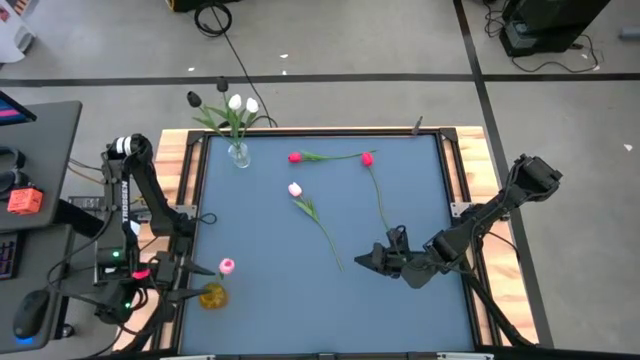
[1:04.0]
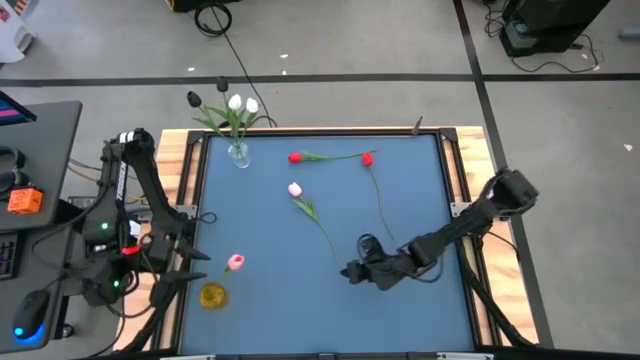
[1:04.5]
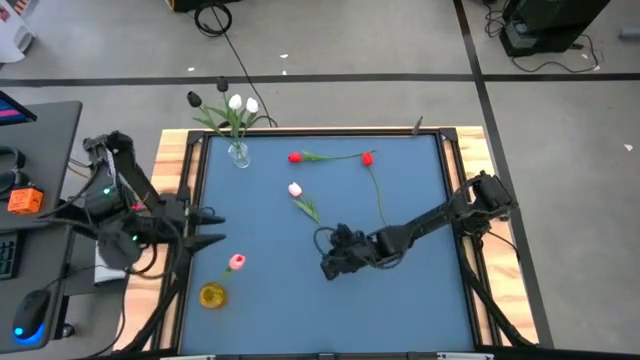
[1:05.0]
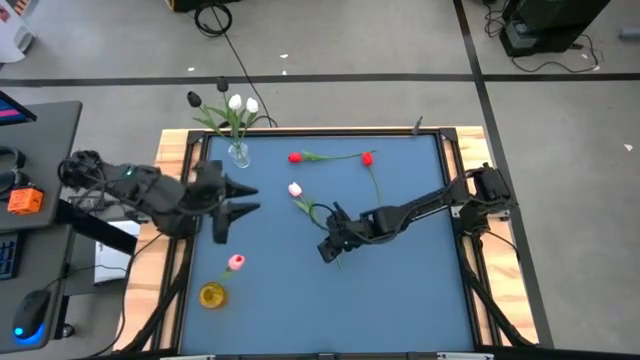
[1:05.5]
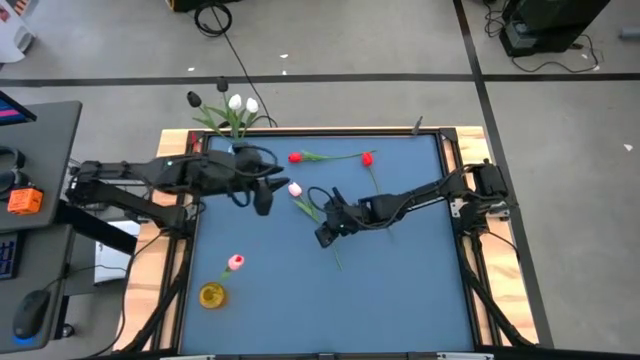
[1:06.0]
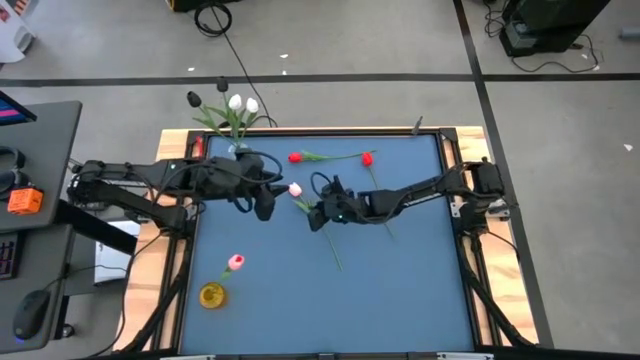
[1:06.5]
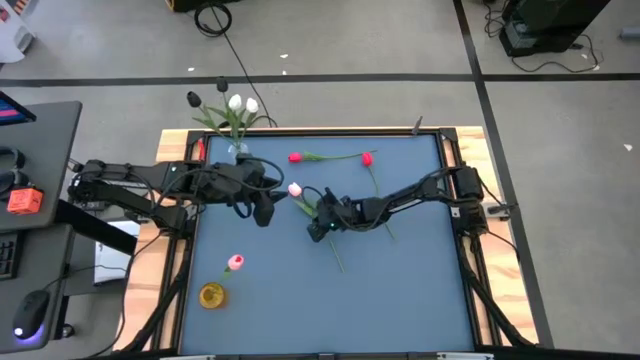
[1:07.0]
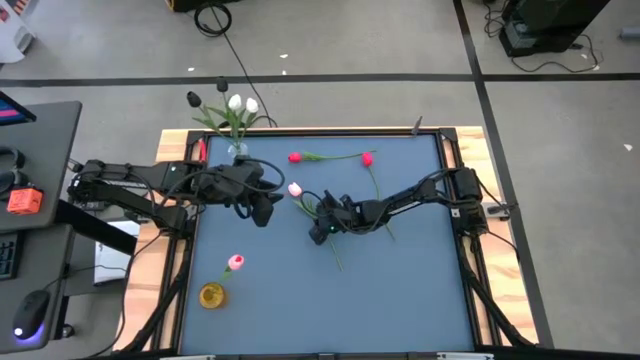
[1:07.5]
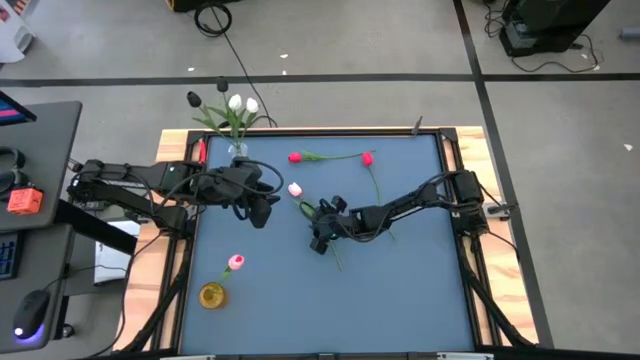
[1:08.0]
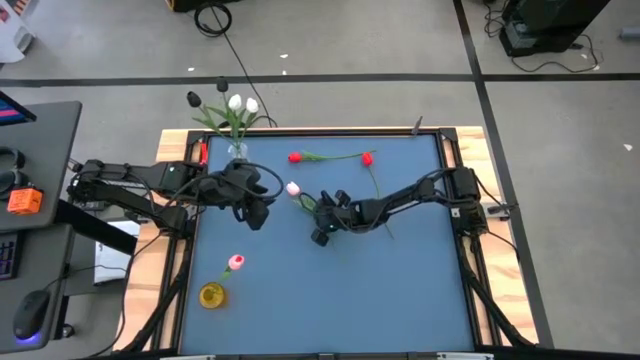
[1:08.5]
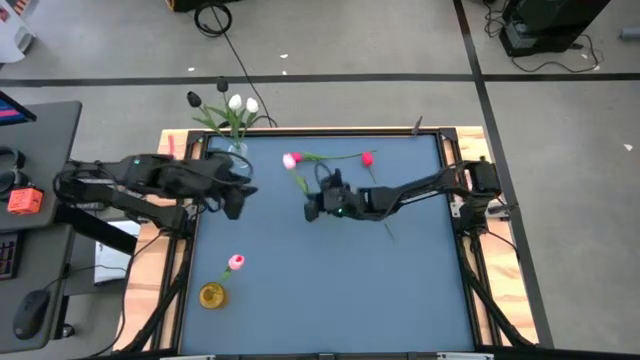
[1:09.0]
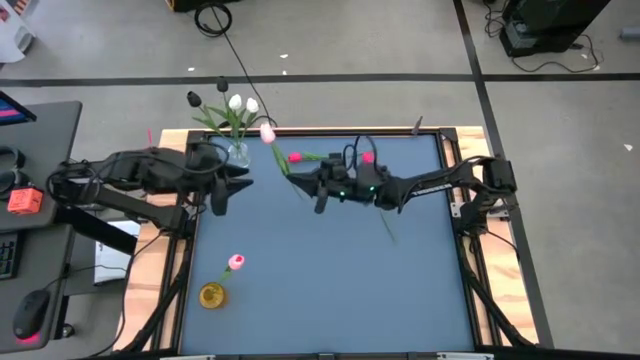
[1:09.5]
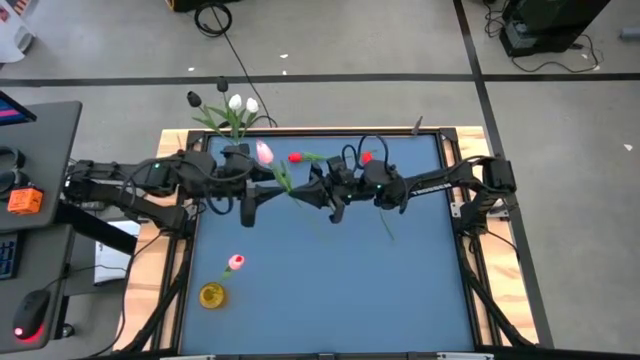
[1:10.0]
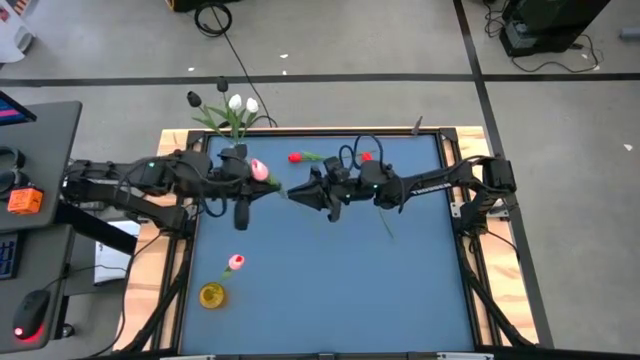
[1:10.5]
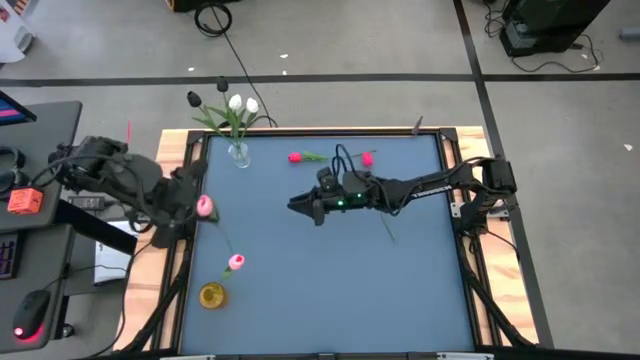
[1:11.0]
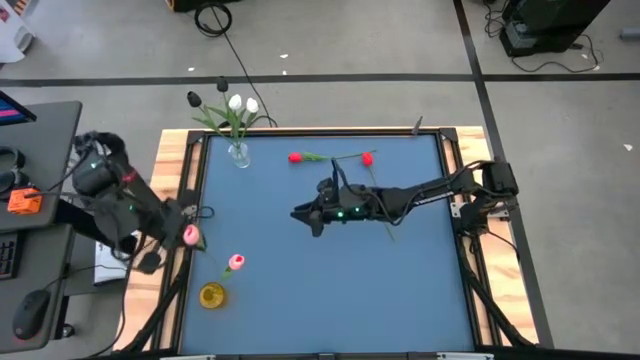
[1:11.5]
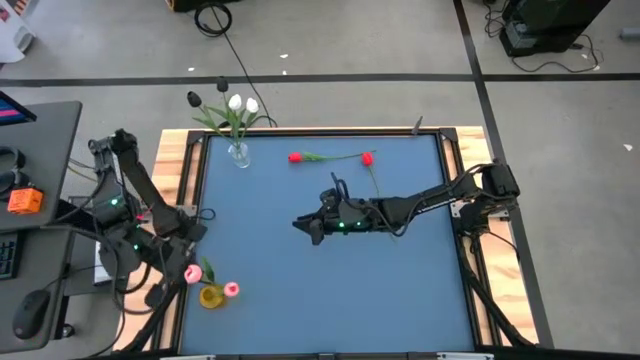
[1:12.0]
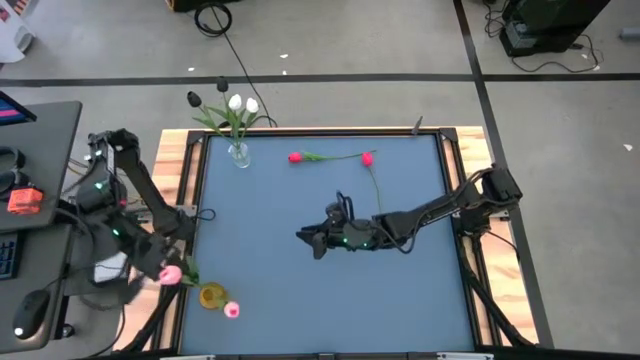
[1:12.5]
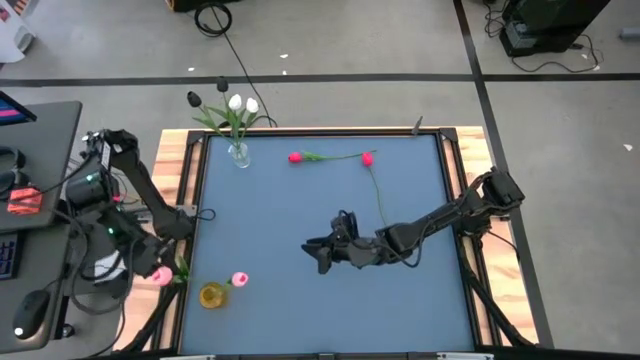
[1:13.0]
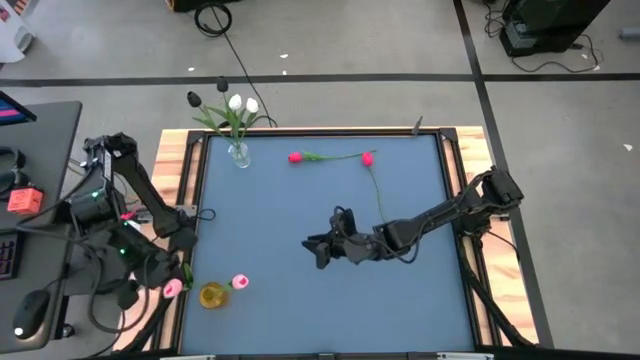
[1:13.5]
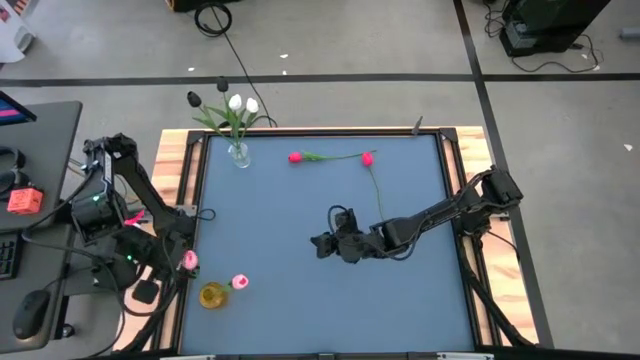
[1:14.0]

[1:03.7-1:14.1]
Task: Sort flowers into vase by color
Put the pink tulip into the yellow vase

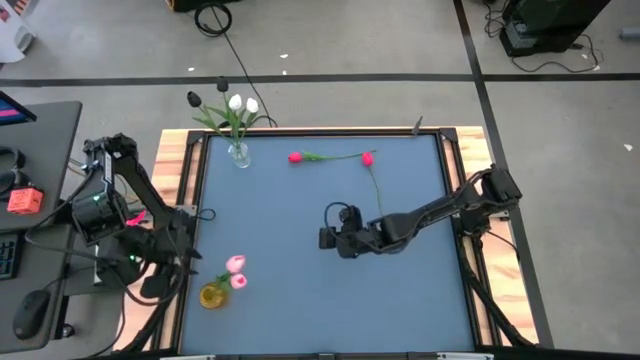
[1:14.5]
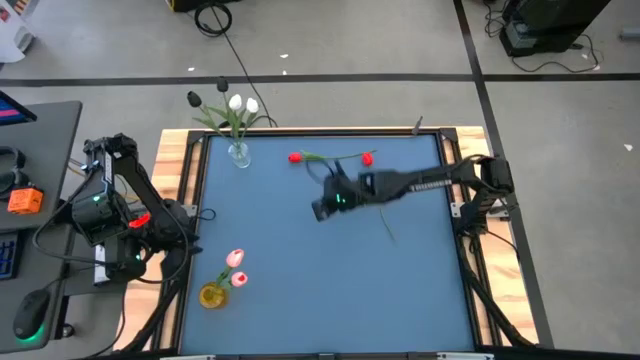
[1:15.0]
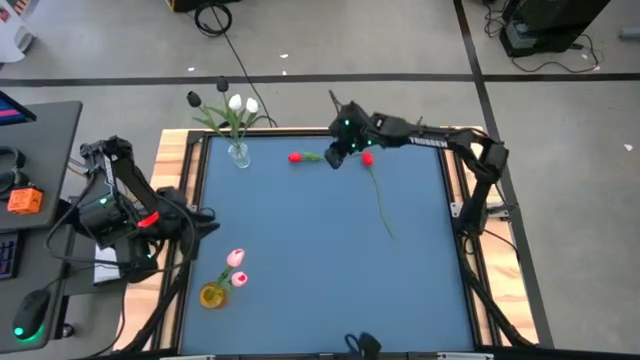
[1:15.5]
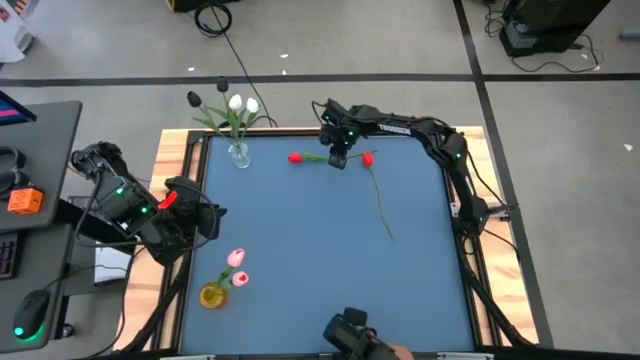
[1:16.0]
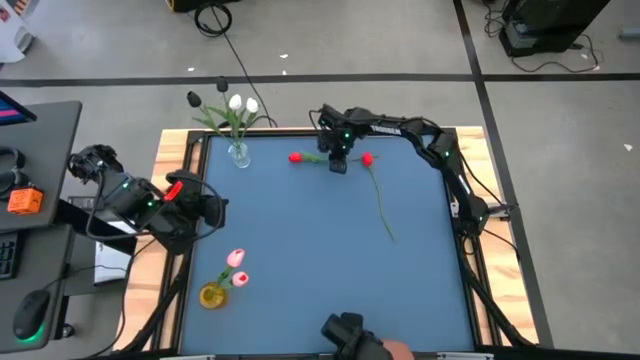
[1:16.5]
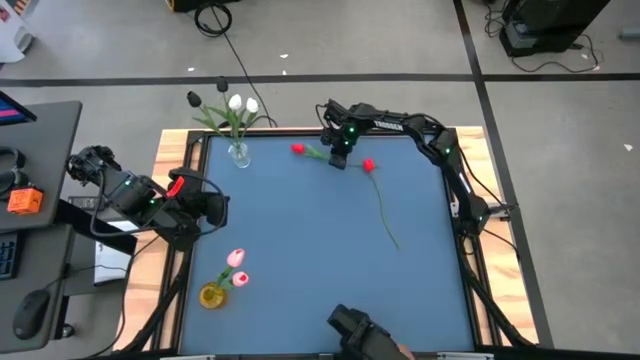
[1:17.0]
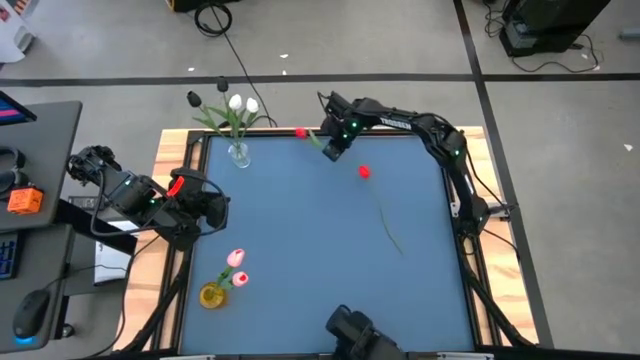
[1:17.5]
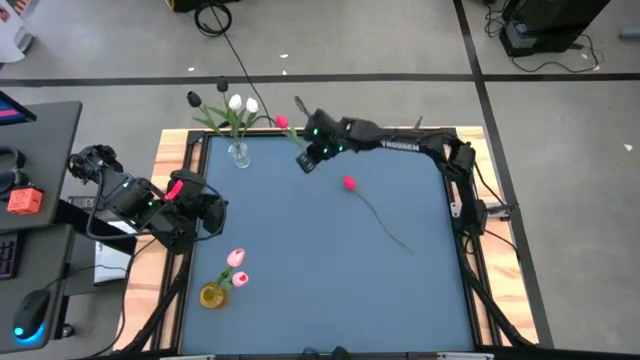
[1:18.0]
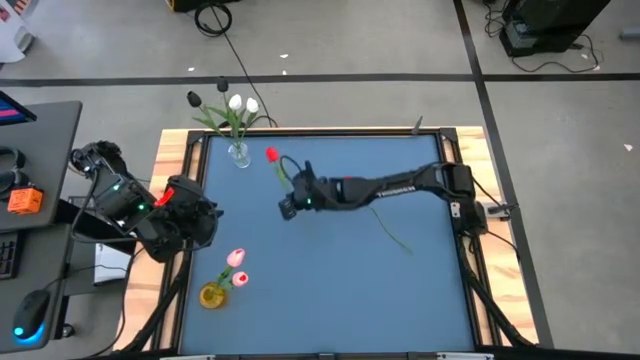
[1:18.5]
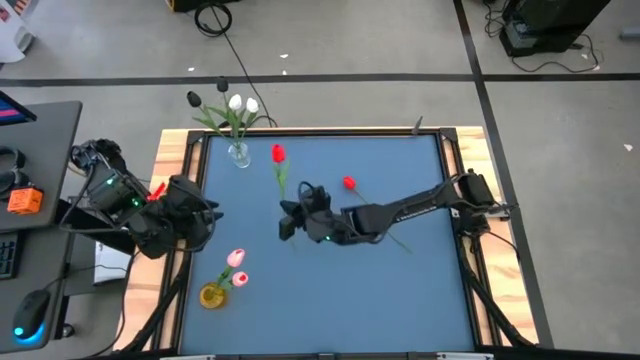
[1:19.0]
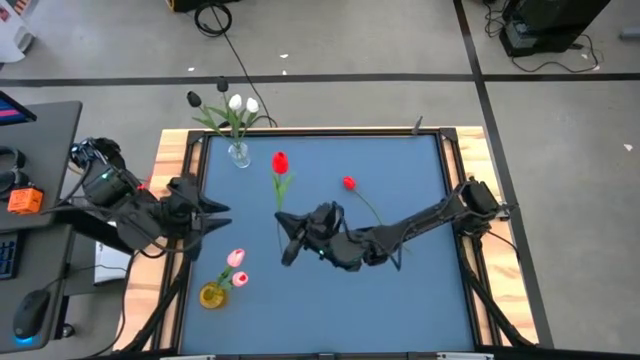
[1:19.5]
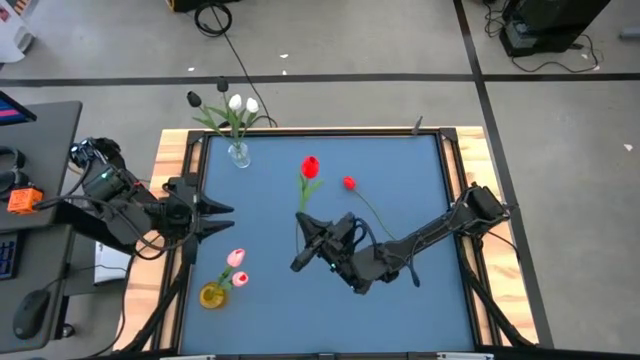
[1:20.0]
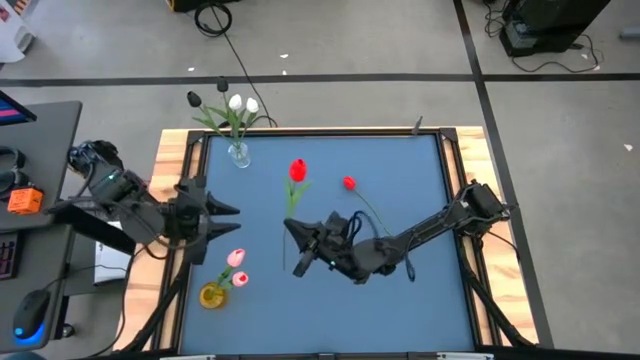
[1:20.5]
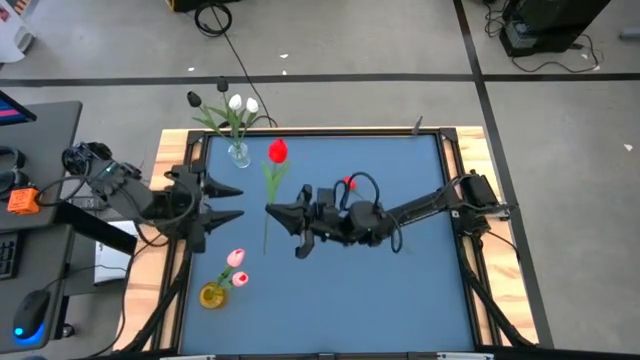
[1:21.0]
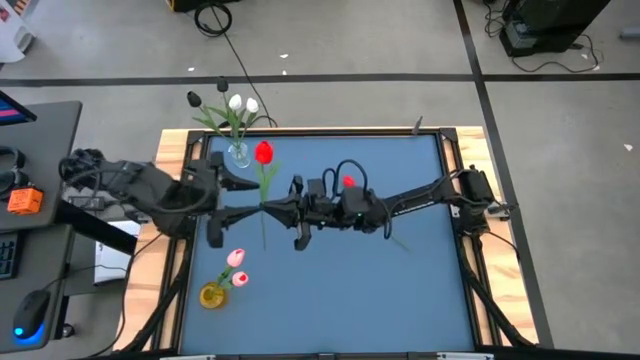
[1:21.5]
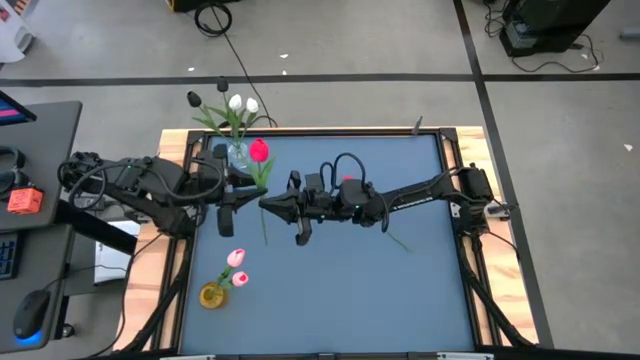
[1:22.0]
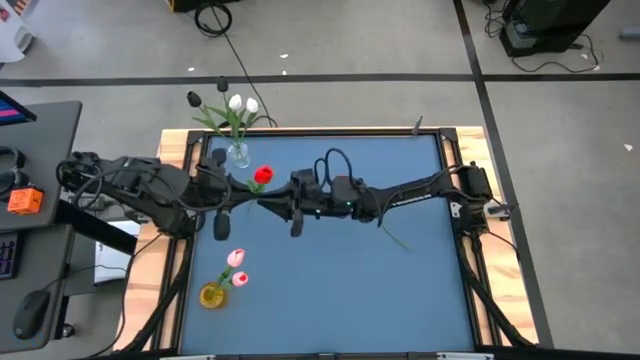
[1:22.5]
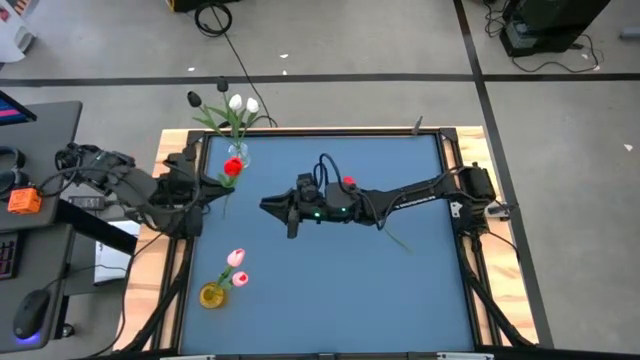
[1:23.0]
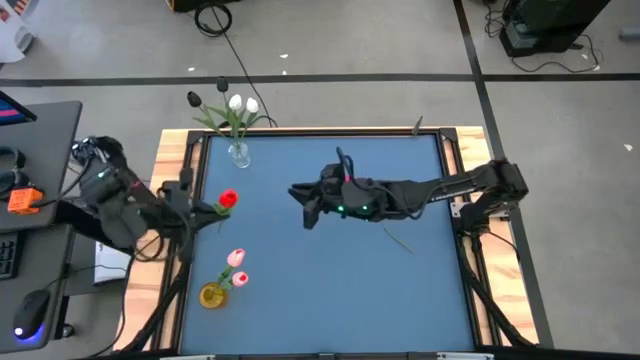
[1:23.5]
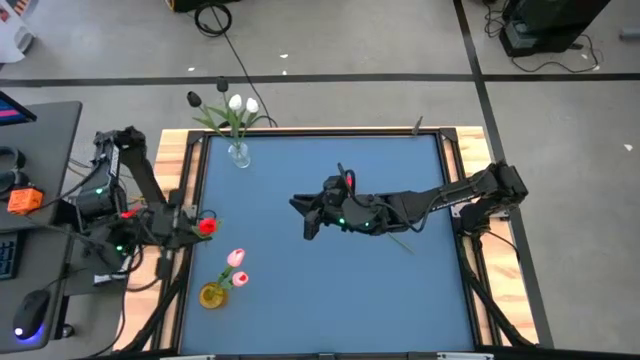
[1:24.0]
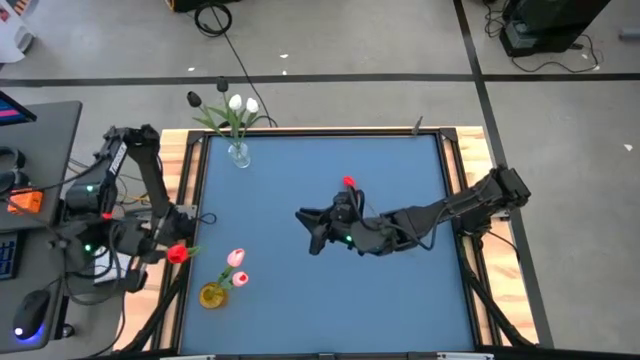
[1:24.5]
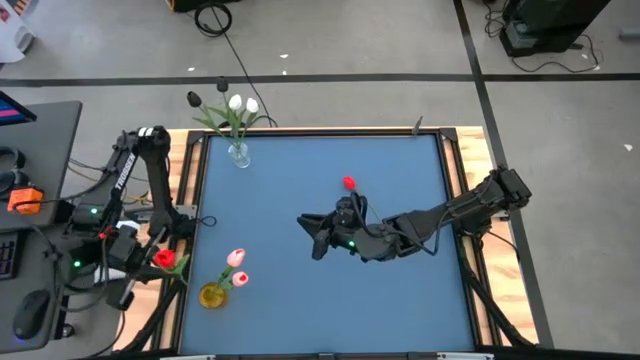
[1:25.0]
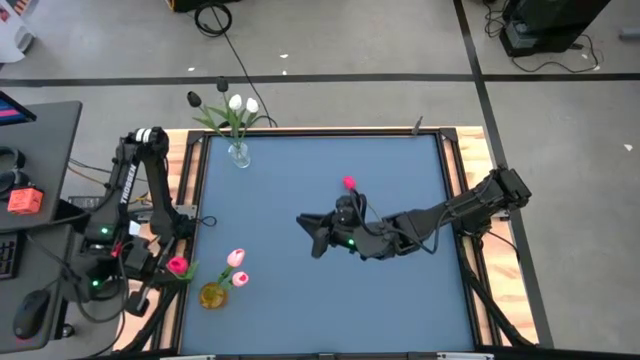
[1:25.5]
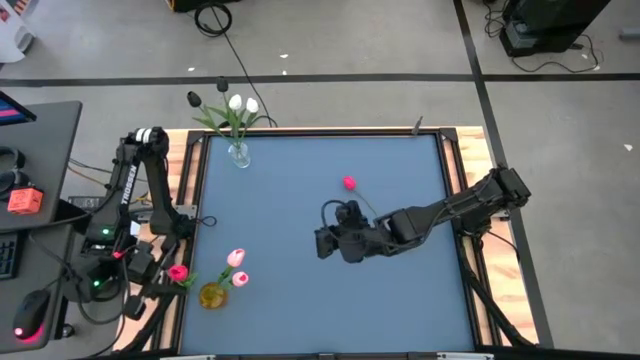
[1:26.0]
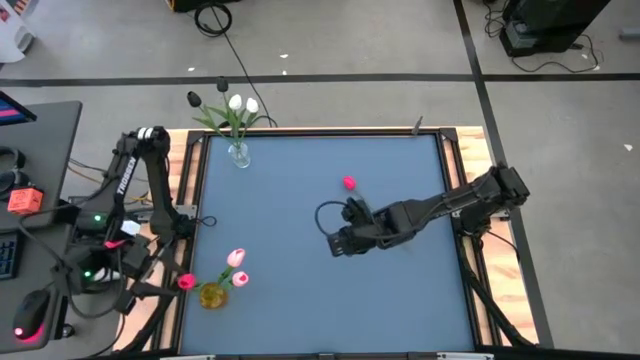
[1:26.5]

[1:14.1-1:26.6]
Put the top red tulip into the yellow vase
